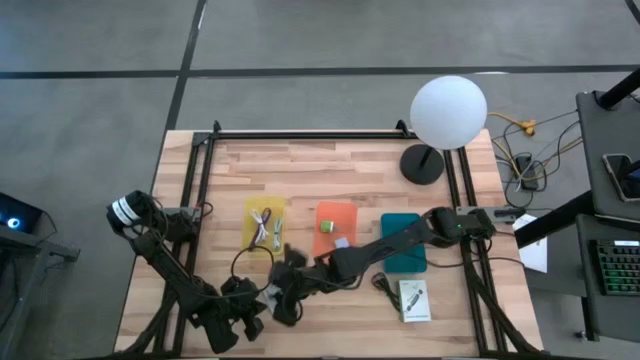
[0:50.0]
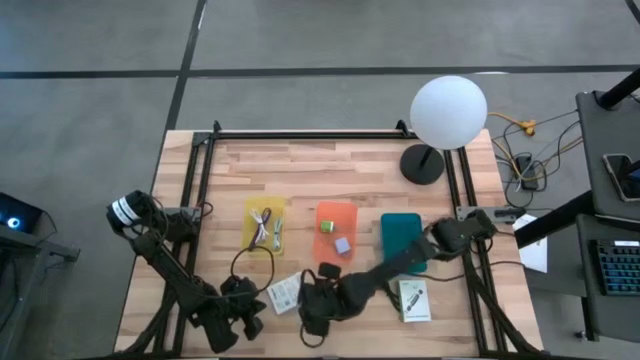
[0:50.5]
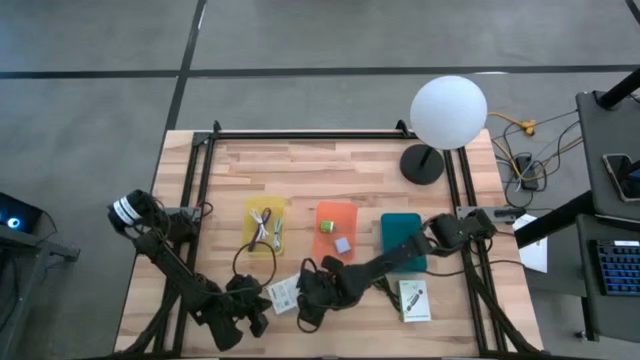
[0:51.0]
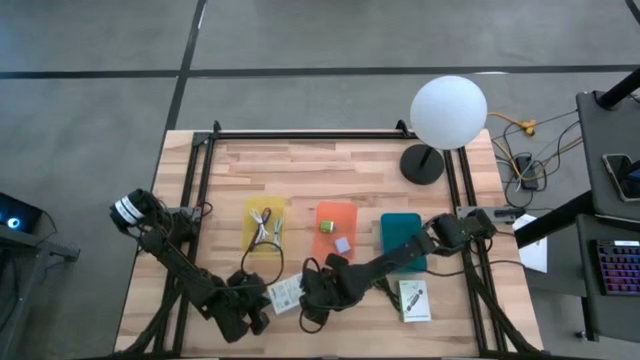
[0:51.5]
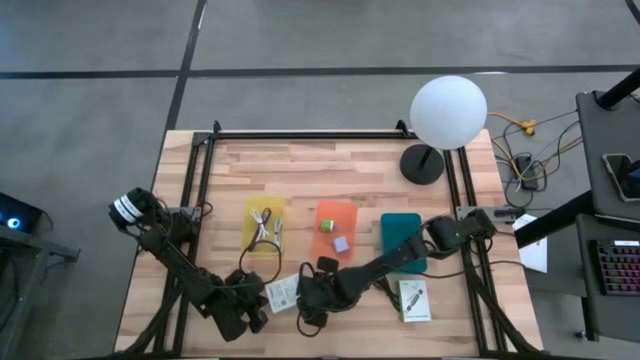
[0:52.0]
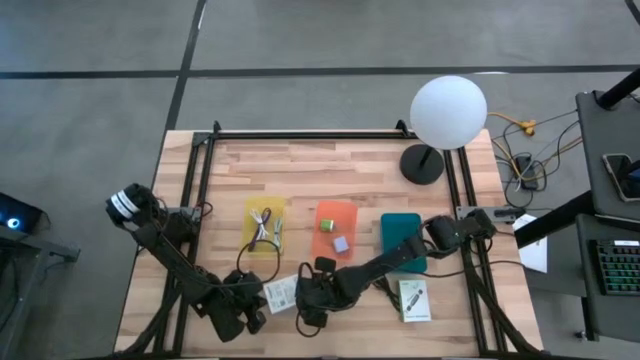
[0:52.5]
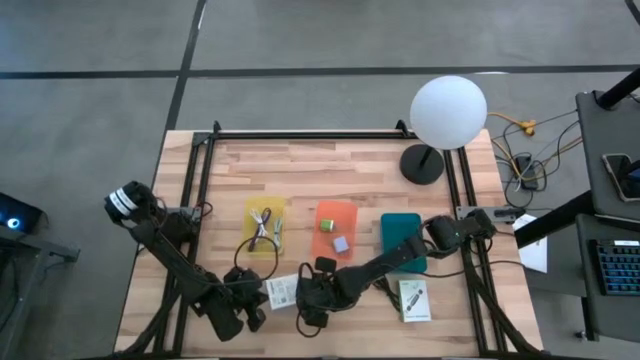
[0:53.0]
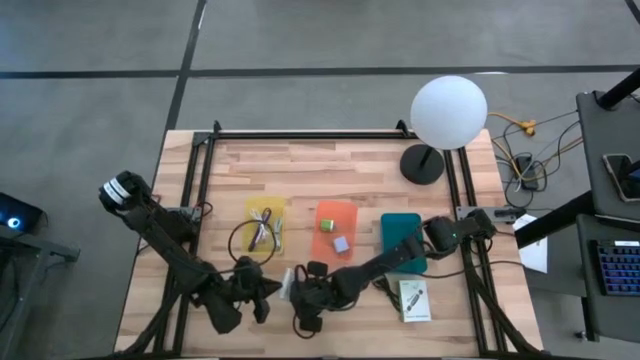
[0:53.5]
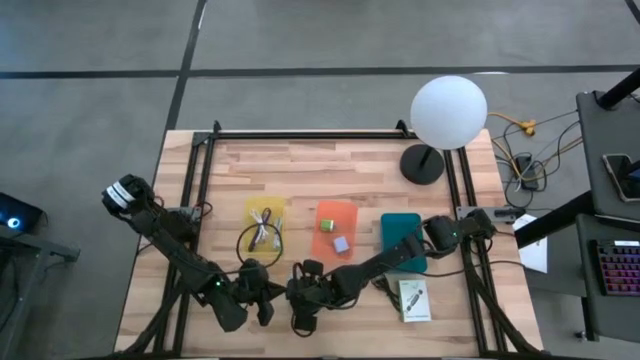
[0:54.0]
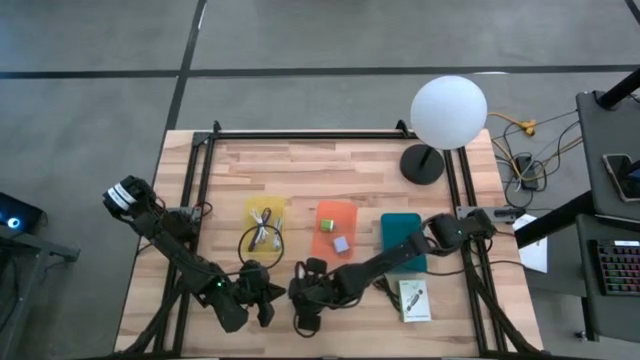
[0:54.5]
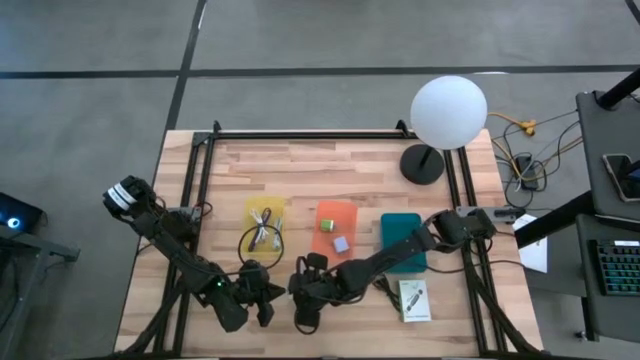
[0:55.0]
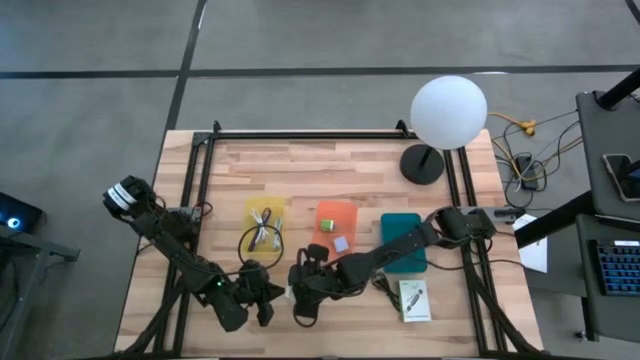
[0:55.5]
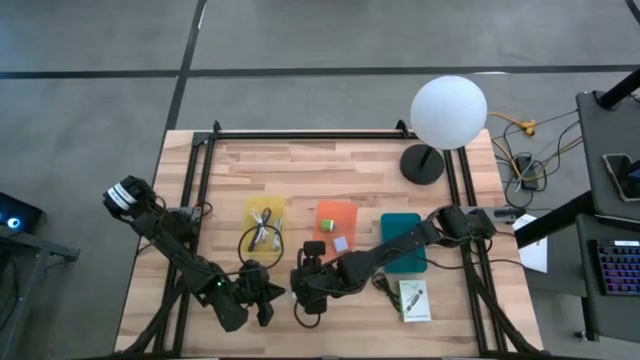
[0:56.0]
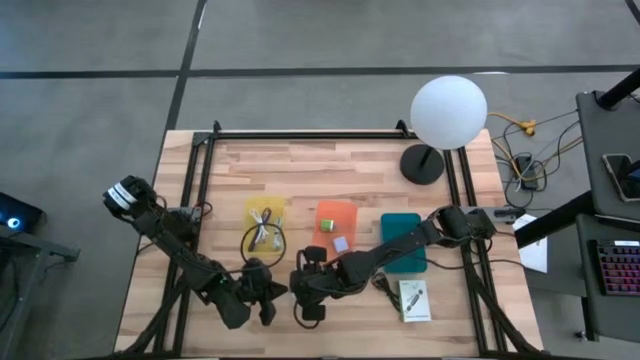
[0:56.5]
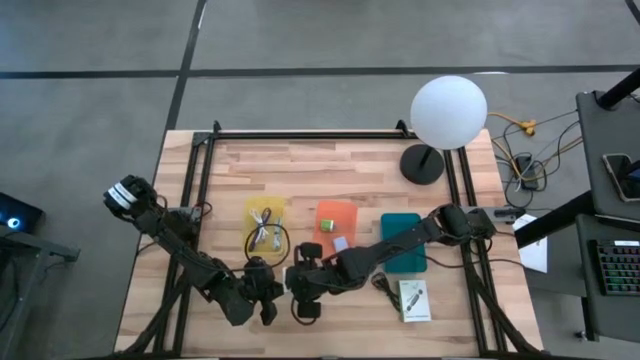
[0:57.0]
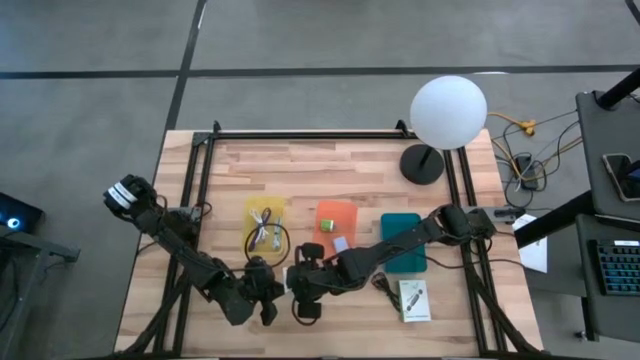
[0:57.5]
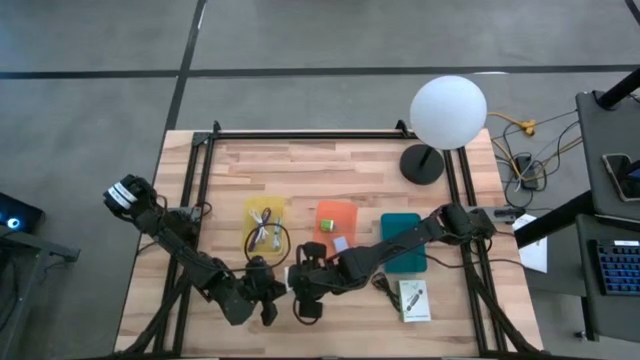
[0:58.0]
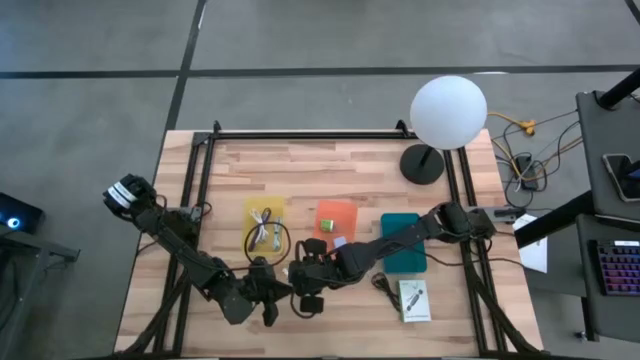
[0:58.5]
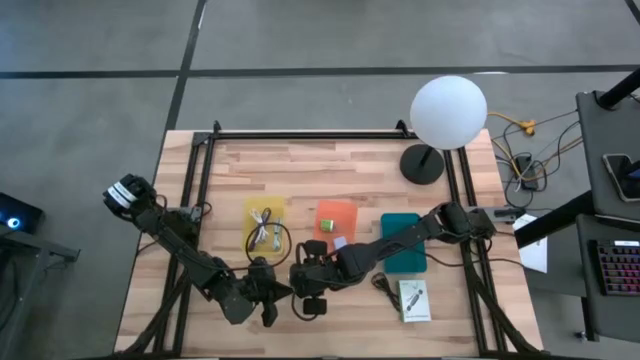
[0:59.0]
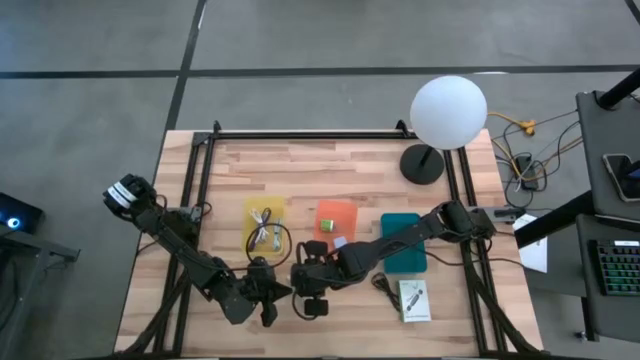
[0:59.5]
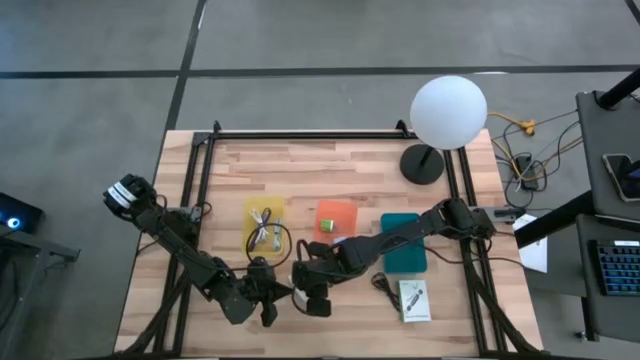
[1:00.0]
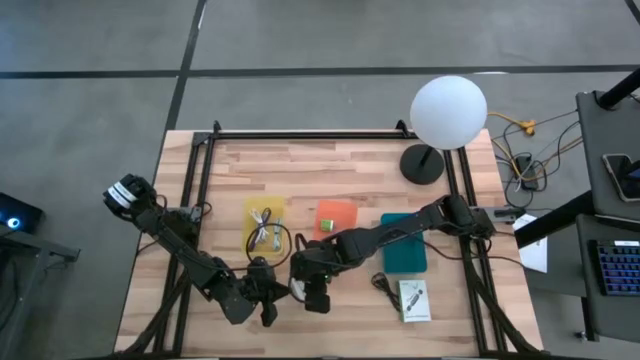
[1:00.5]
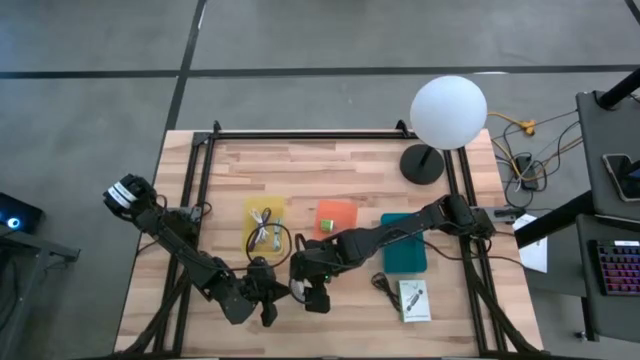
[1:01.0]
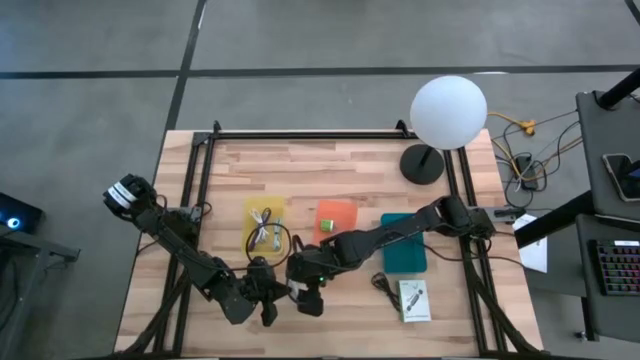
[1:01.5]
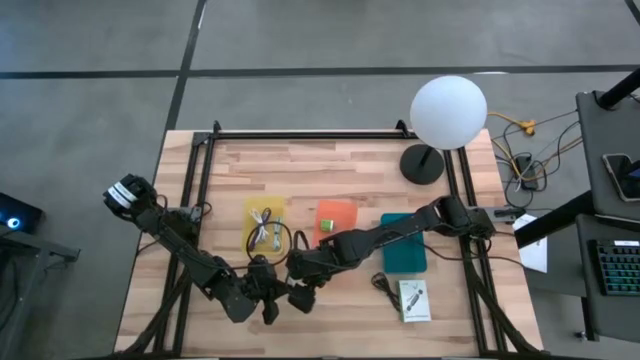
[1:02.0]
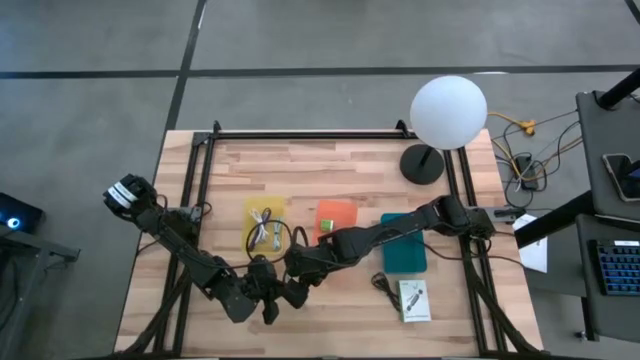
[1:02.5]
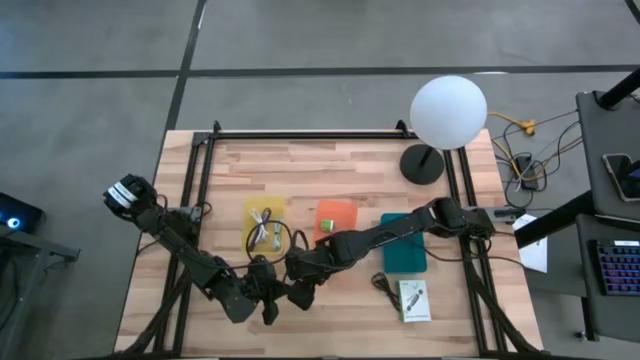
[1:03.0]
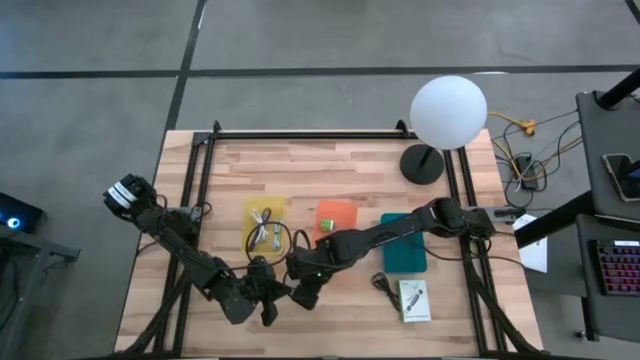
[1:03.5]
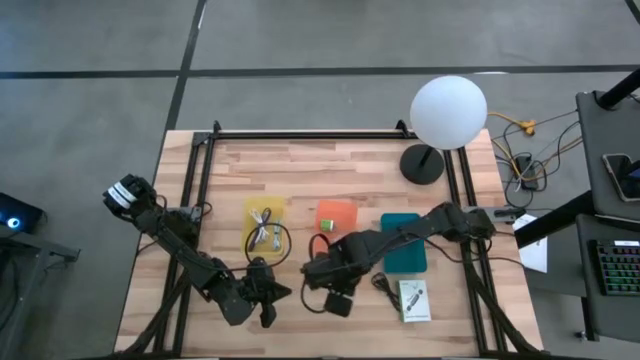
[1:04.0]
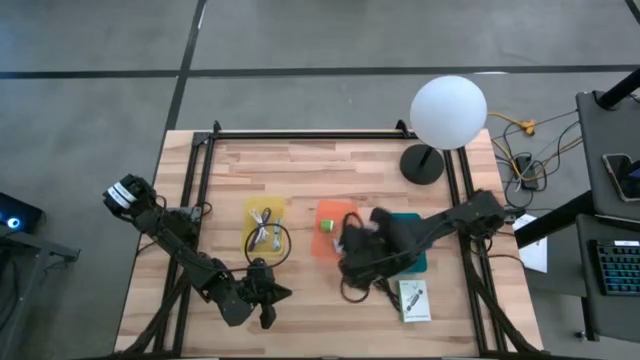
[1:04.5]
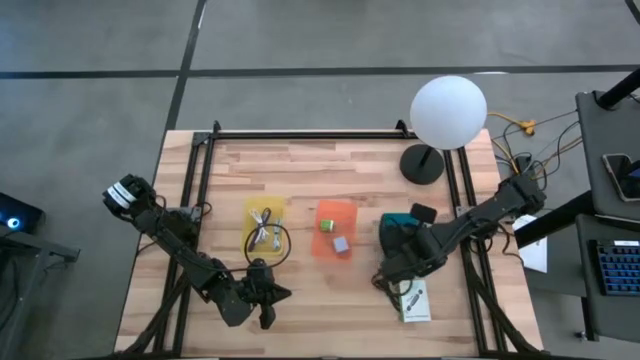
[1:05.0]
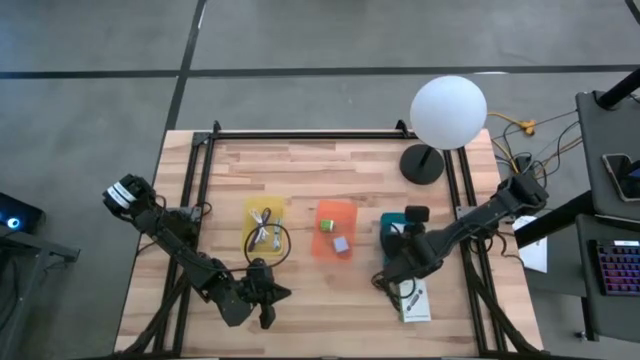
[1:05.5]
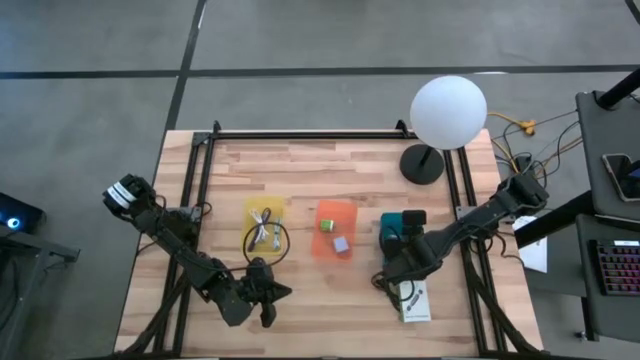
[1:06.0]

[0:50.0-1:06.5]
Task: Pick and place items into bin
Put the left white card reader box into the blue bin

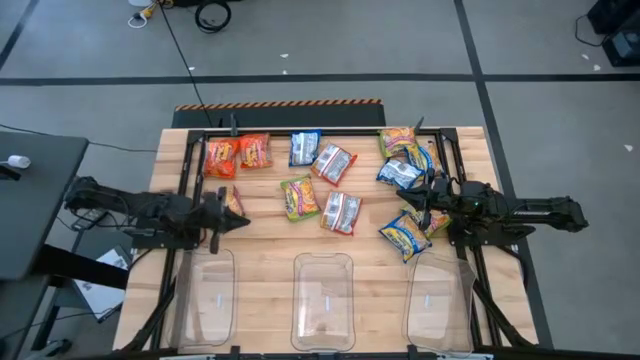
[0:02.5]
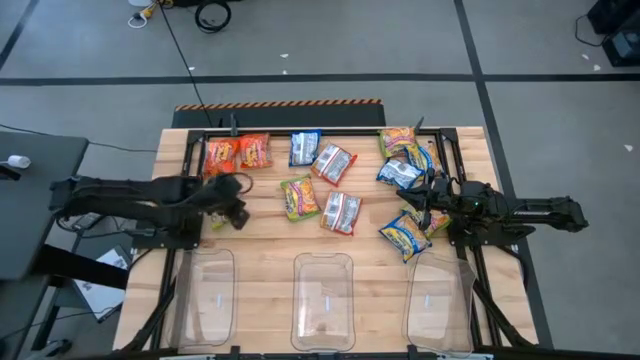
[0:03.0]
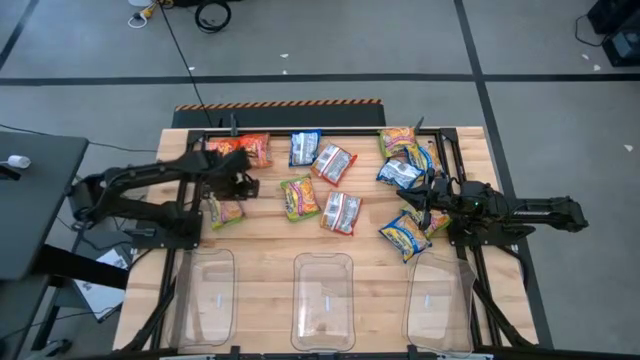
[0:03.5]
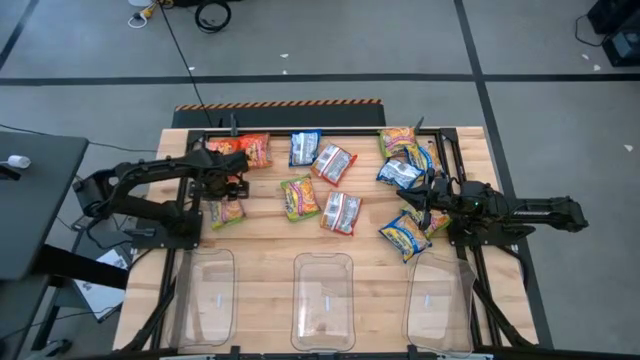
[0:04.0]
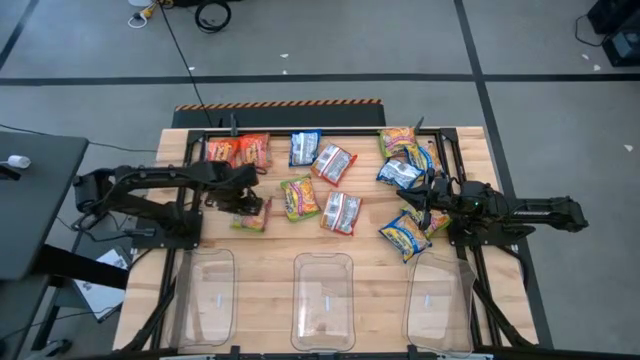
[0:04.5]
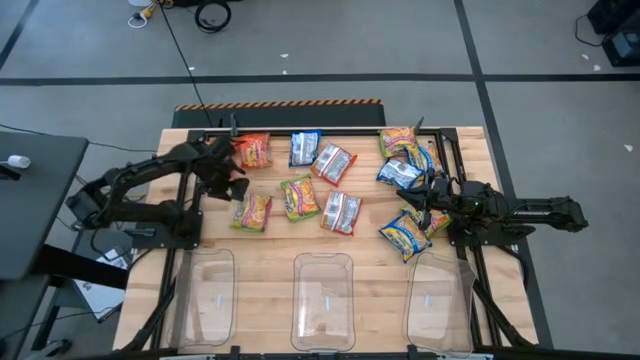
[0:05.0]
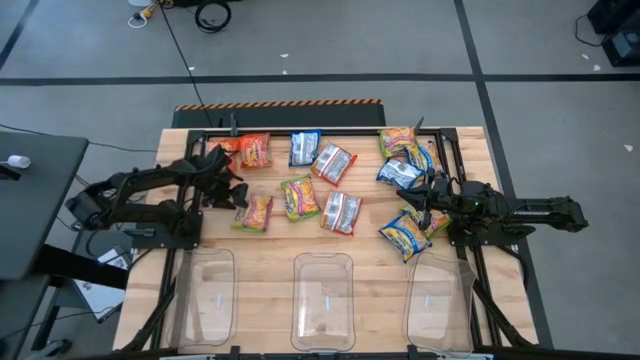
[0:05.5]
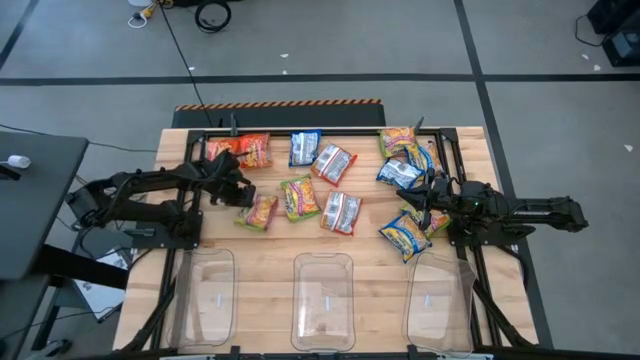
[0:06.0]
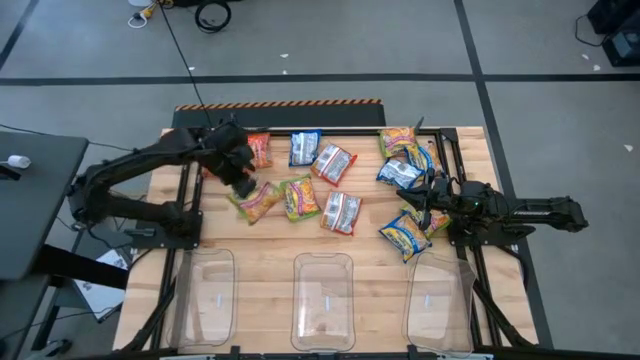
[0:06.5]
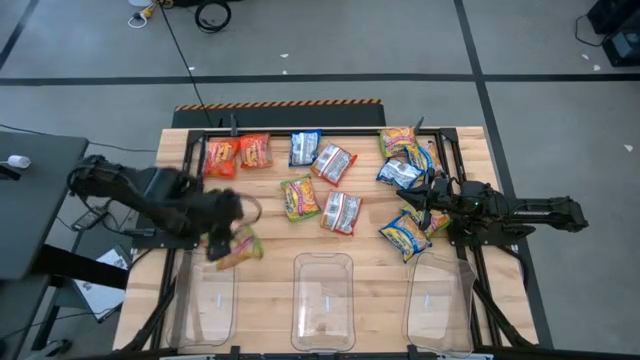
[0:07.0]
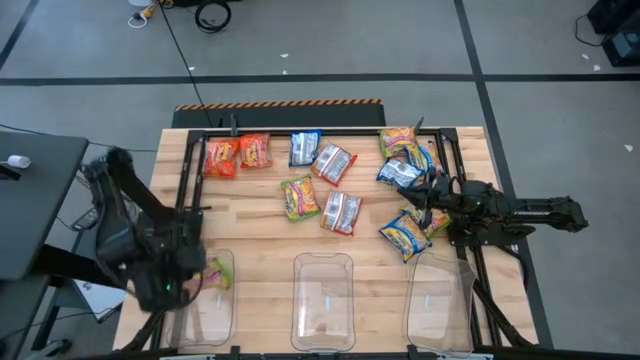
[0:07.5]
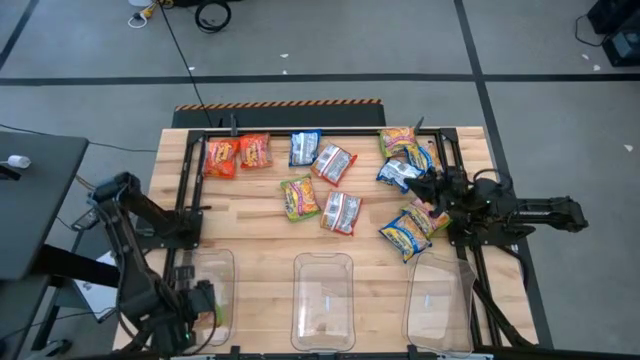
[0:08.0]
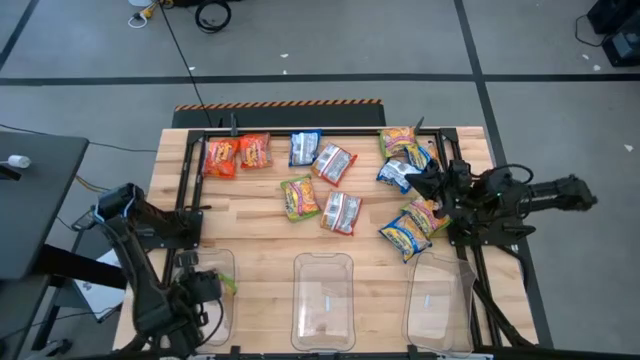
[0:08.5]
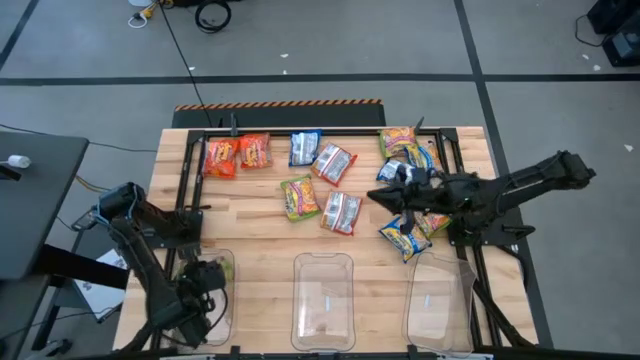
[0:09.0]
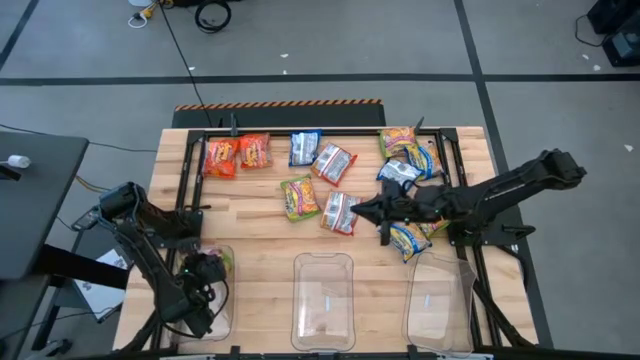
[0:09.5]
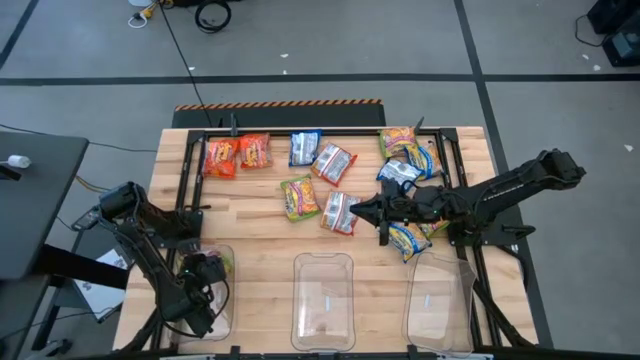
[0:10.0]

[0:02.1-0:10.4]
Task: Sort Maruchan noodles
Put the green noodle pack into the left transparent bin
